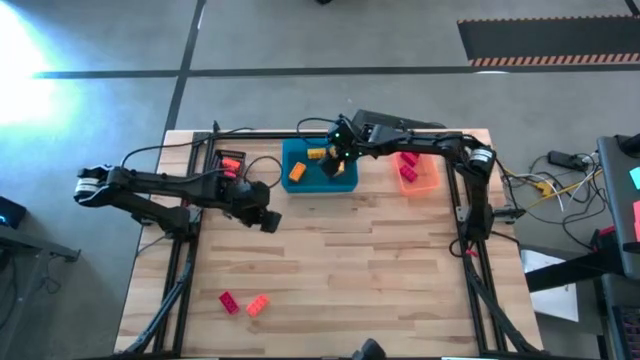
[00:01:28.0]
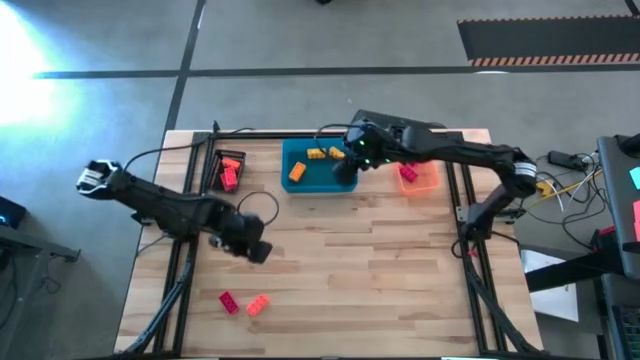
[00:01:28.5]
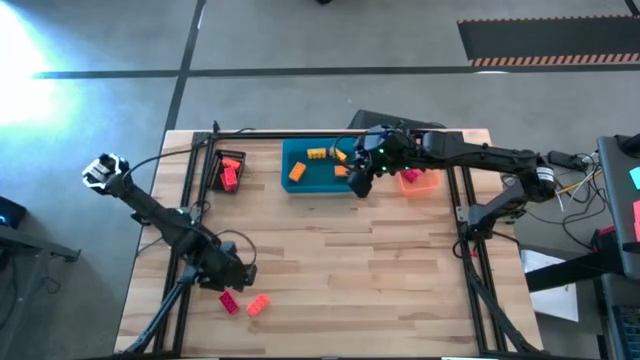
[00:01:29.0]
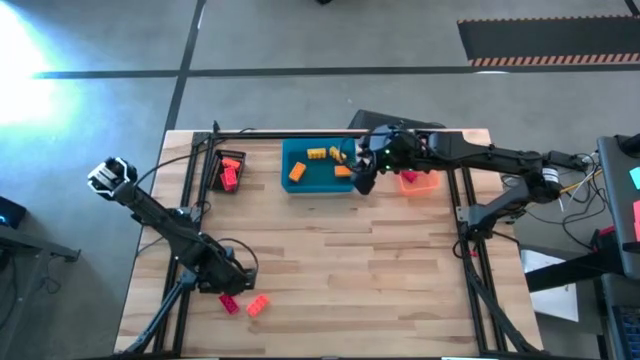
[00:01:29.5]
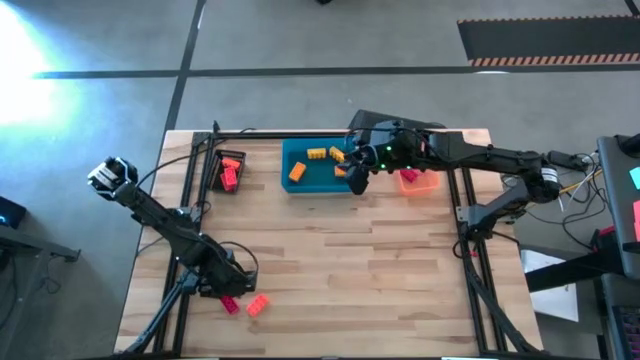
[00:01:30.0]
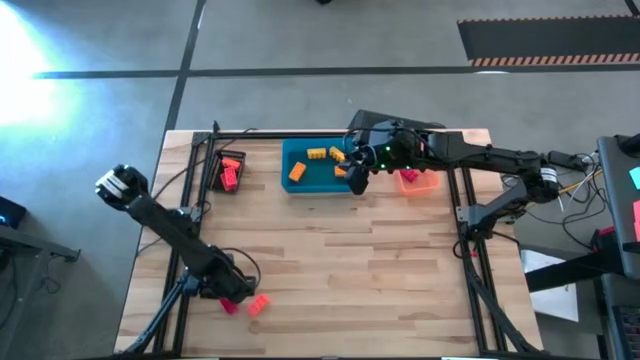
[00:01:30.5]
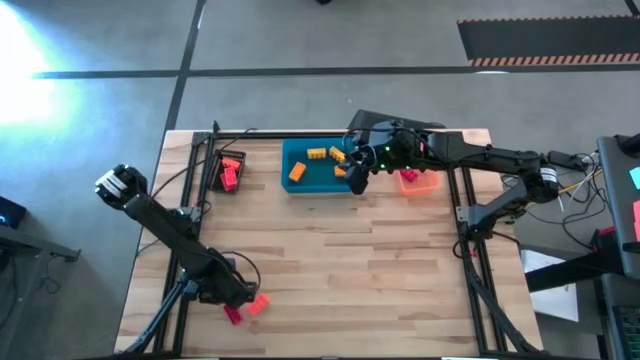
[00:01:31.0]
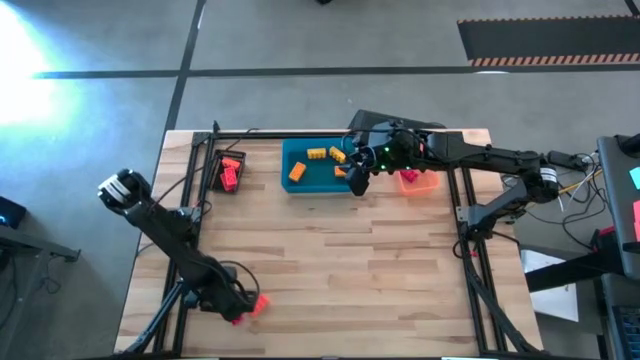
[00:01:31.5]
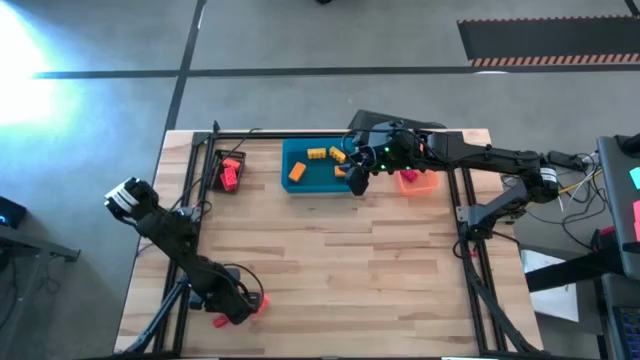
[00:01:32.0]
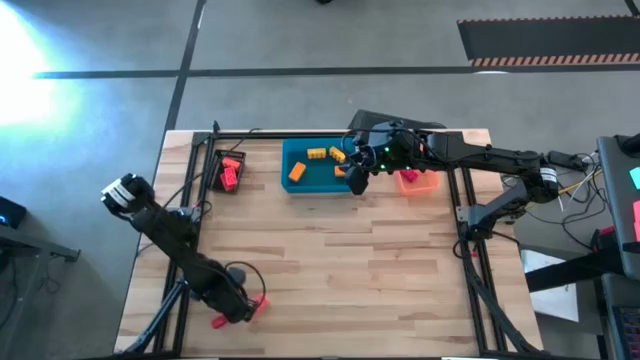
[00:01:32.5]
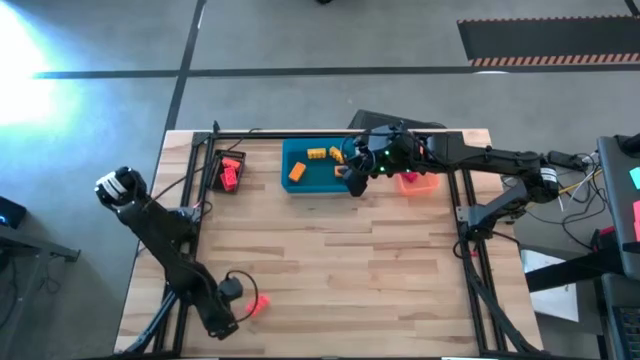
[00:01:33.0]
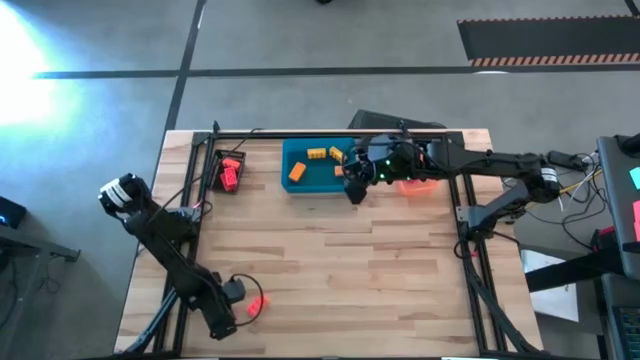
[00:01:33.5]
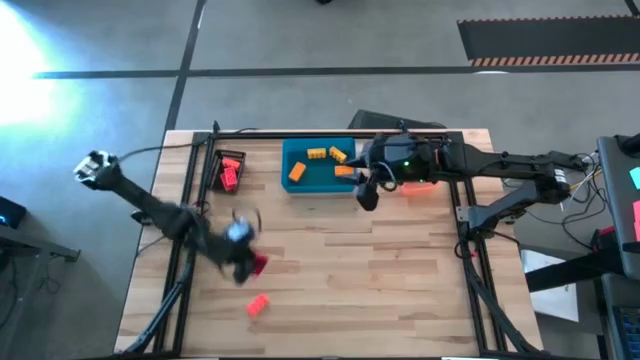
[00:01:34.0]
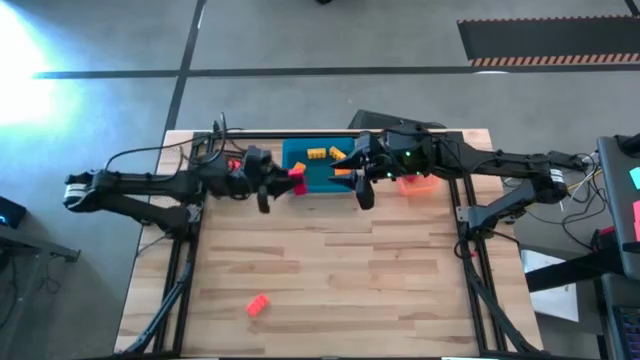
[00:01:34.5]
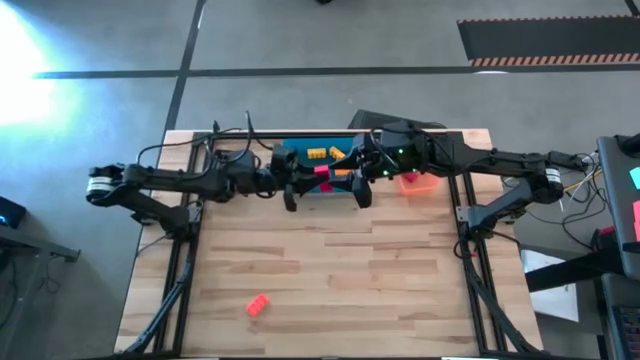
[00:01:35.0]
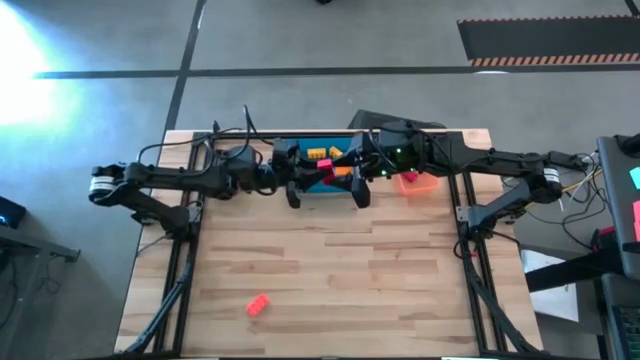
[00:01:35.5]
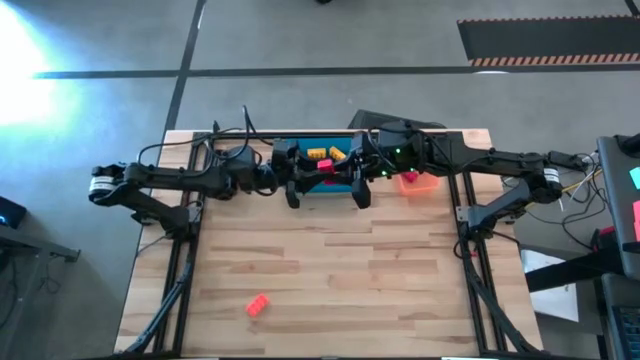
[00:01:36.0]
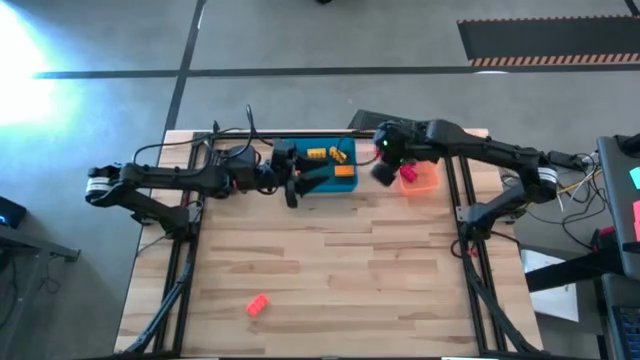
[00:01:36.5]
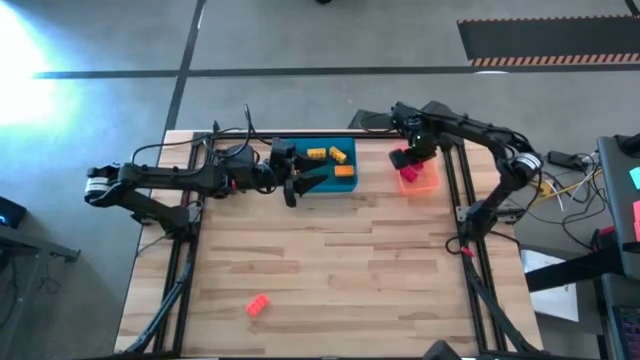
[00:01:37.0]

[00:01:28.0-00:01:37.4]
Task: Sort & place blocks by color
Put the red game piece into the orange bin

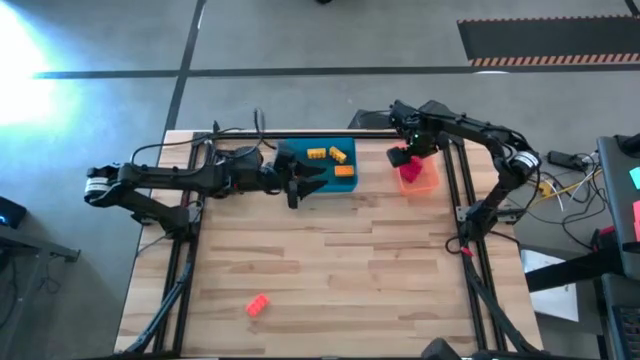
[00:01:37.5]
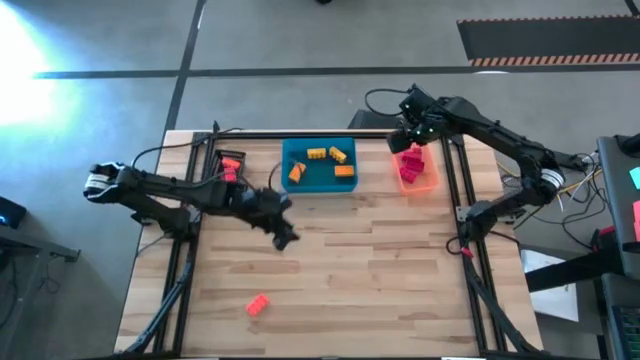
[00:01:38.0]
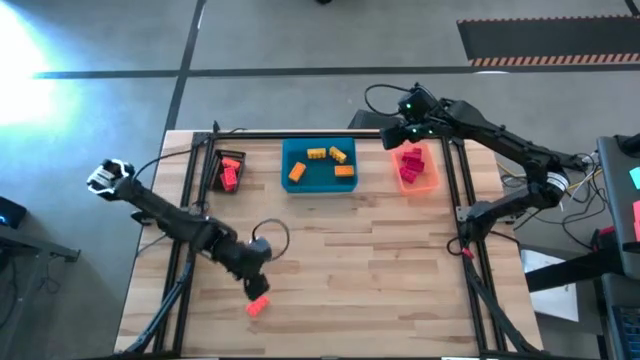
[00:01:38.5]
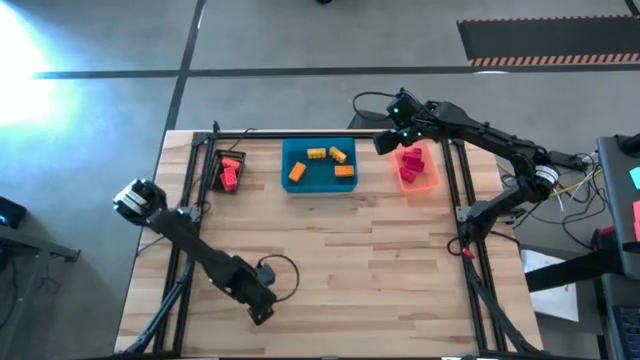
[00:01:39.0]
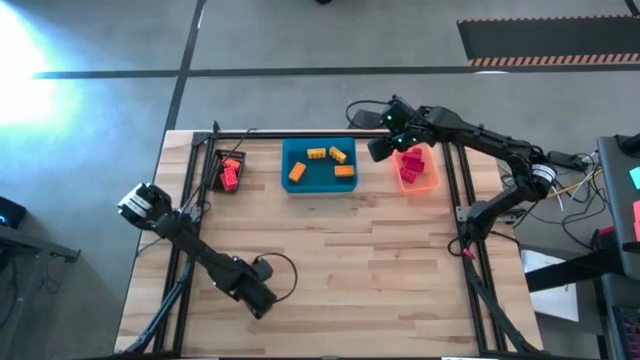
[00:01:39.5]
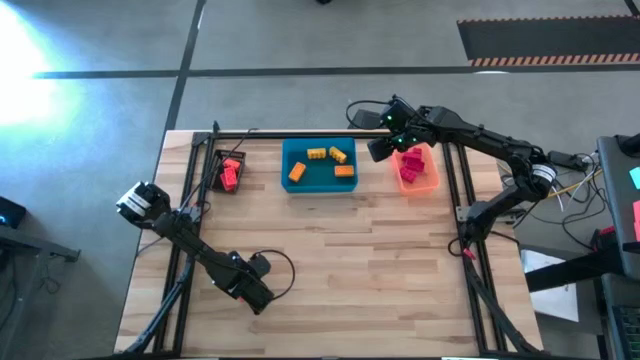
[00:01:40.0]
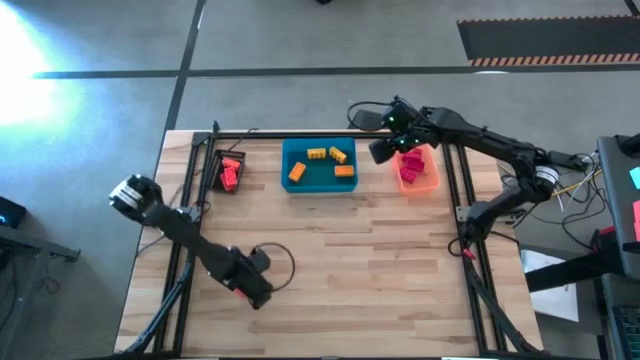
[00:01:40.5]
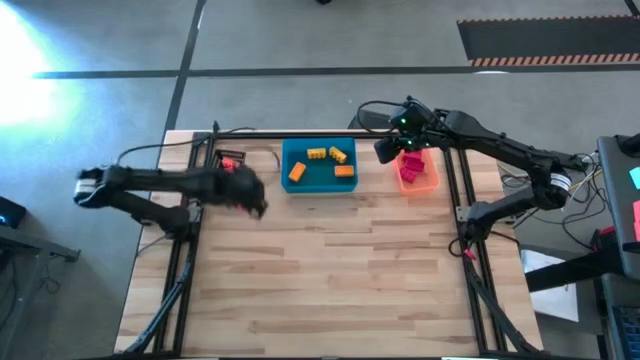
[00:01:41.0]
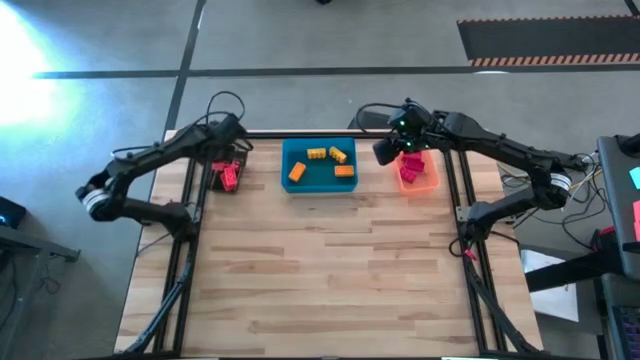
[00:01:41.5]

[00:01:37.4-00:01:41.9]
Put the orange game piece into the black bin

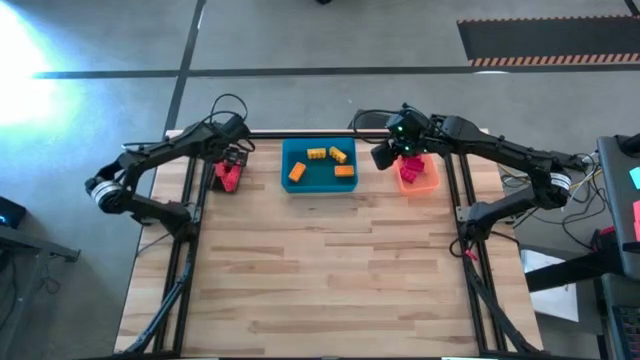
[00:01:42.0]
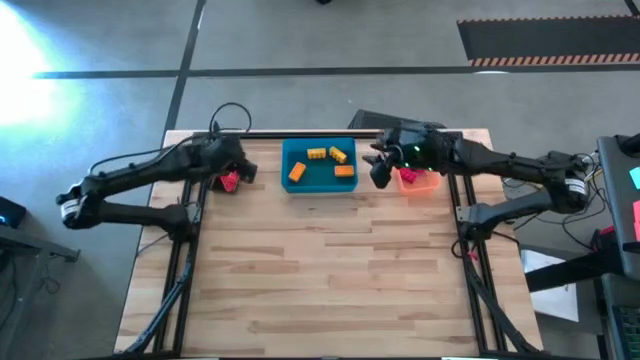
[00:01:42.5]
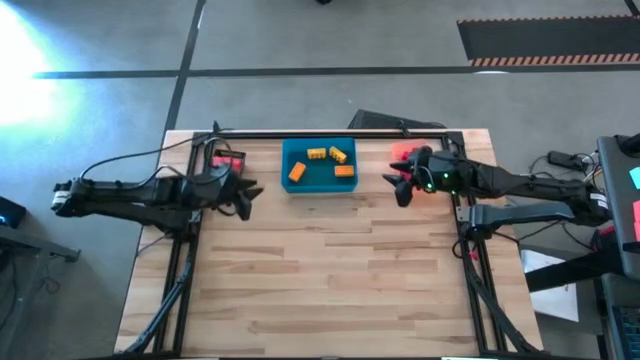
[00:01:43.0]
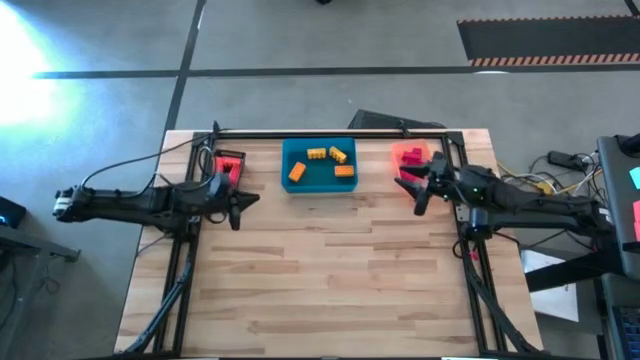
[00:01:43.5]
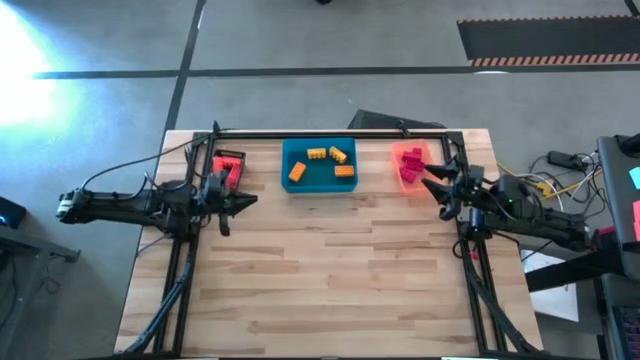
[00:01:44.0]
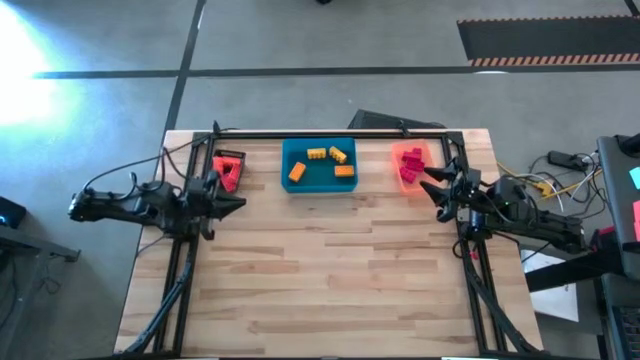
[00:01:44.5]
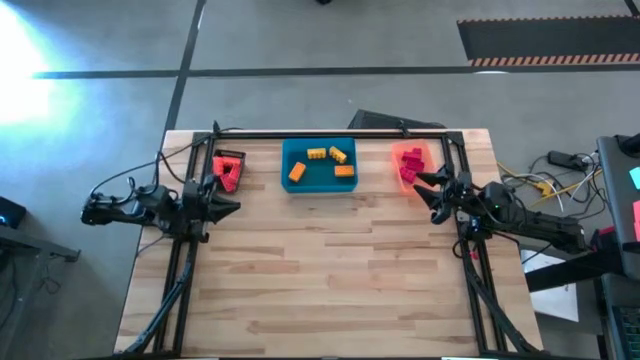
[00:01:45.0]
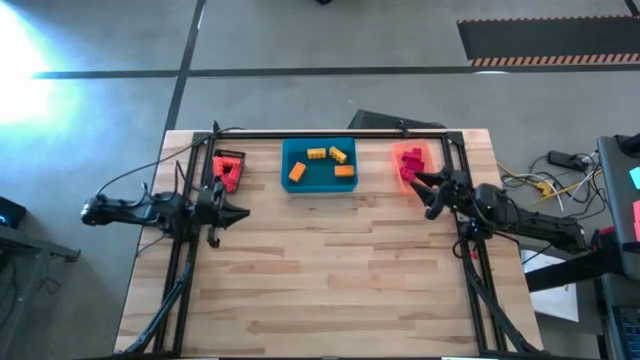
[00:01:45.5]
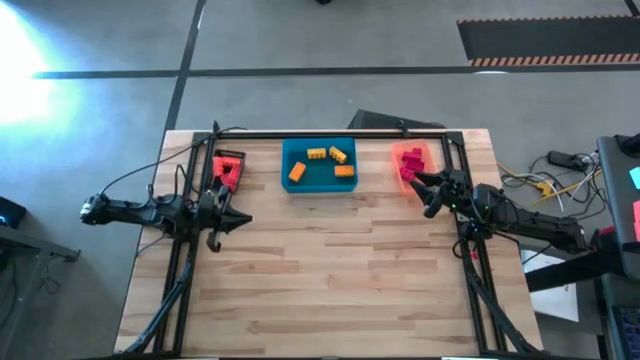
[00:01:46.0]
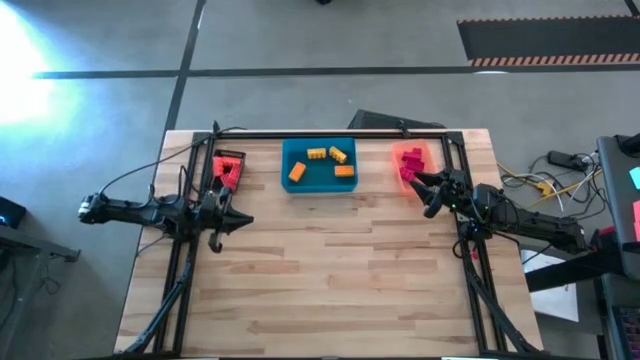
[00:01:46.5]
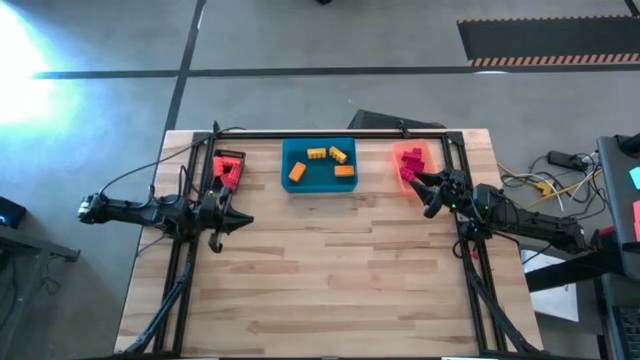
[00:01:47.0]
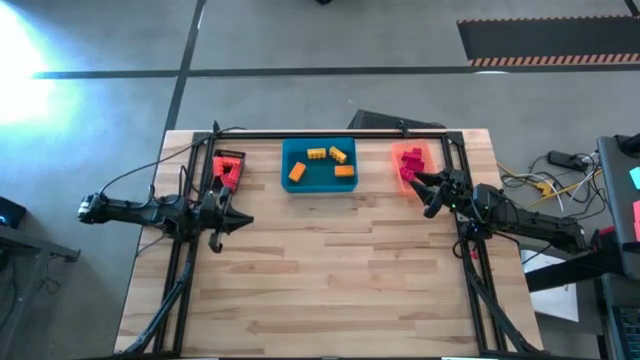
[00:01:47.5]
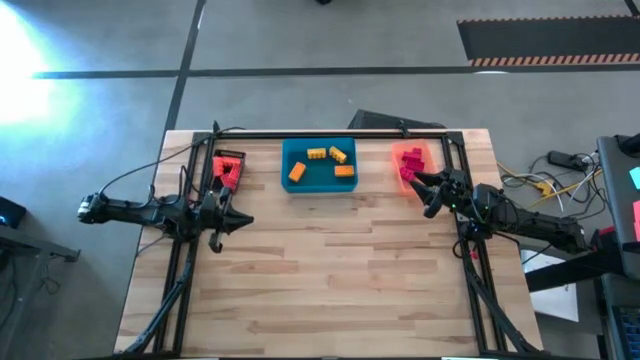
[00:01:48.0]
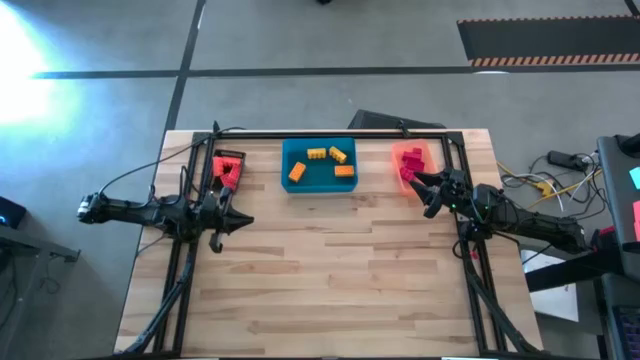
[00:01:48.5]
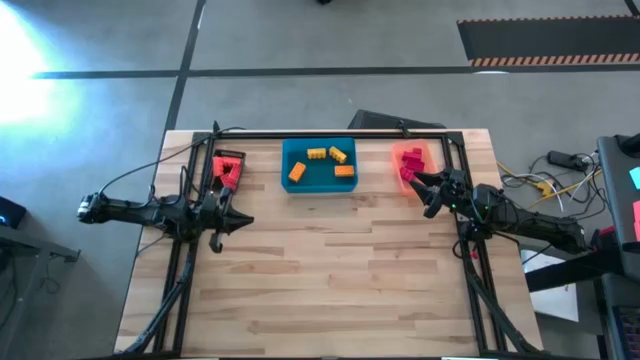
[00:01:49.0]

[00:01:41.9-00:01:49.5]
Return to Home Position
